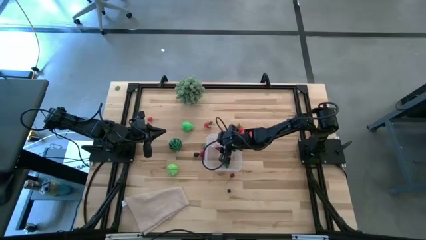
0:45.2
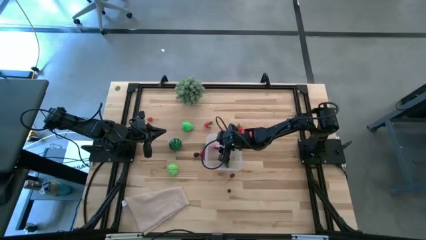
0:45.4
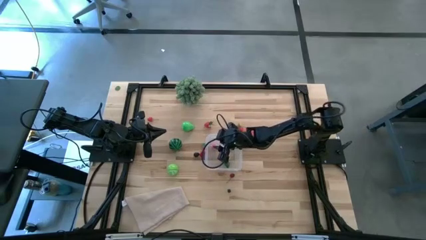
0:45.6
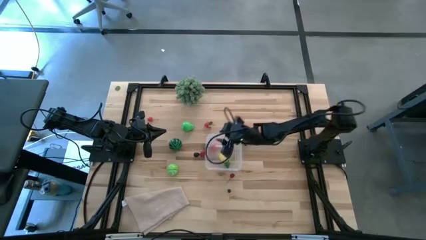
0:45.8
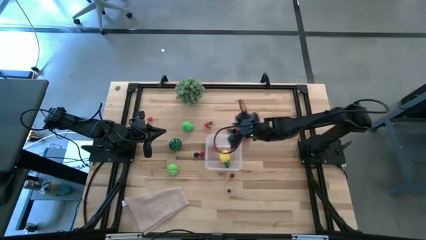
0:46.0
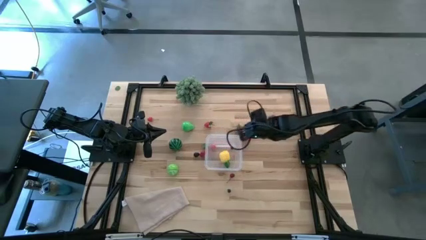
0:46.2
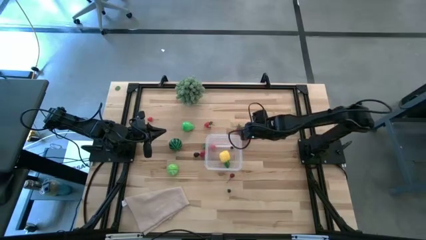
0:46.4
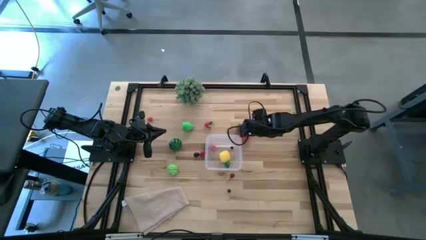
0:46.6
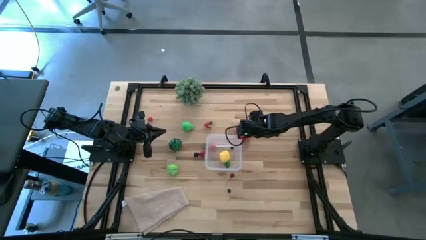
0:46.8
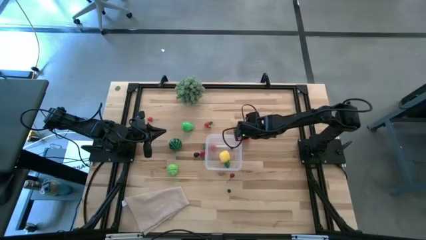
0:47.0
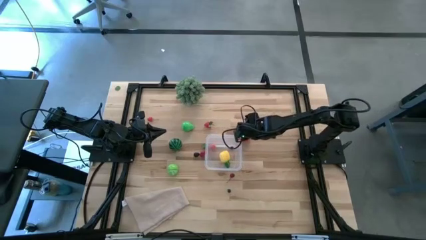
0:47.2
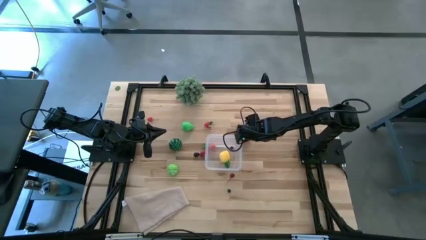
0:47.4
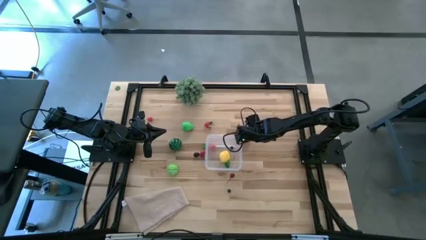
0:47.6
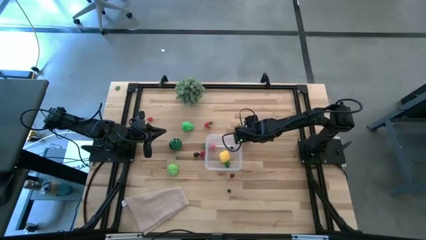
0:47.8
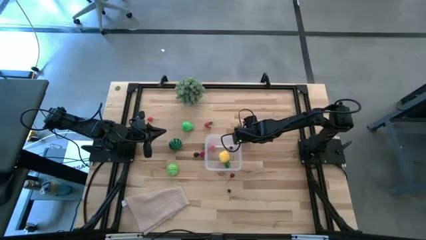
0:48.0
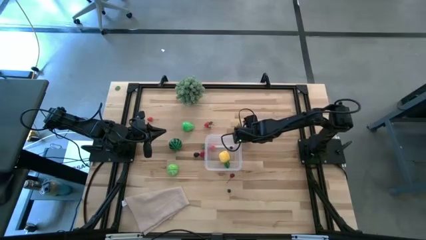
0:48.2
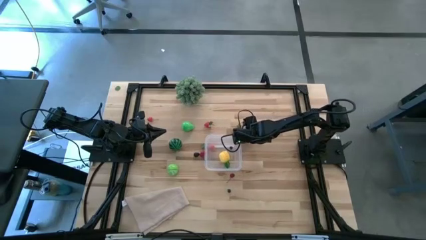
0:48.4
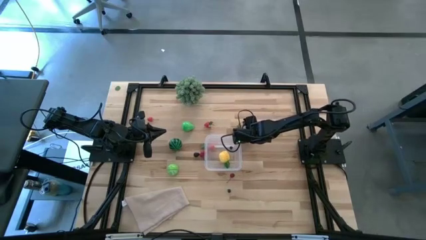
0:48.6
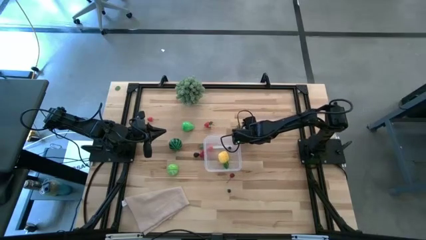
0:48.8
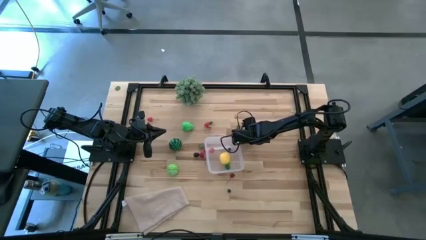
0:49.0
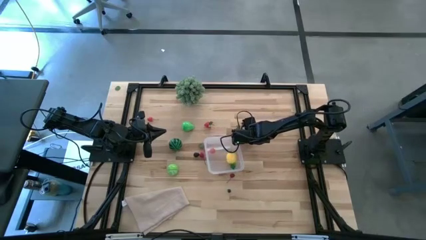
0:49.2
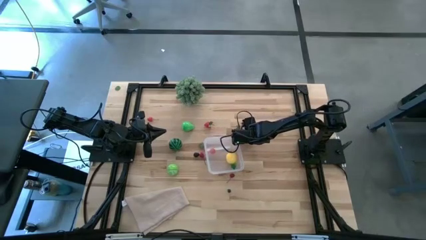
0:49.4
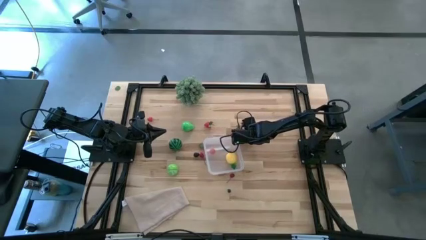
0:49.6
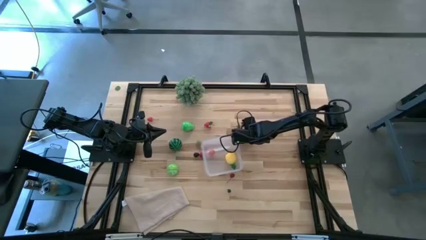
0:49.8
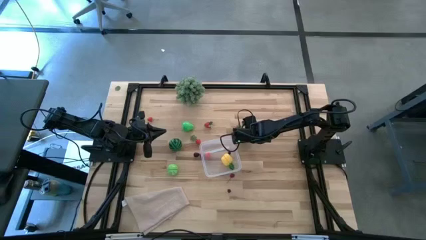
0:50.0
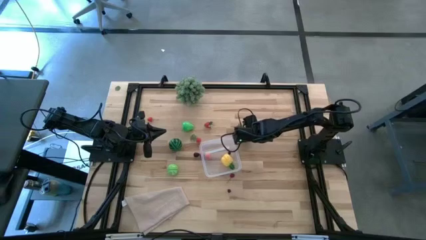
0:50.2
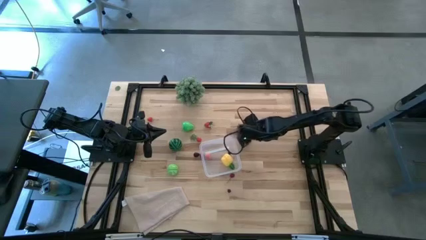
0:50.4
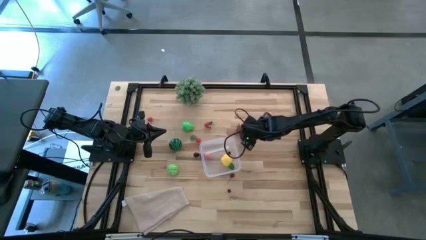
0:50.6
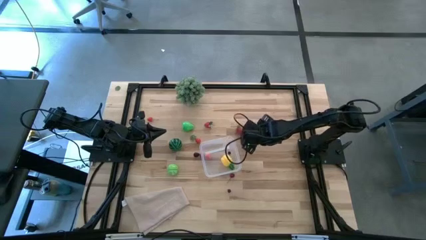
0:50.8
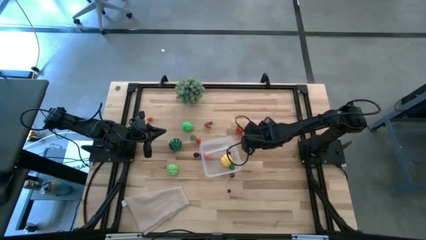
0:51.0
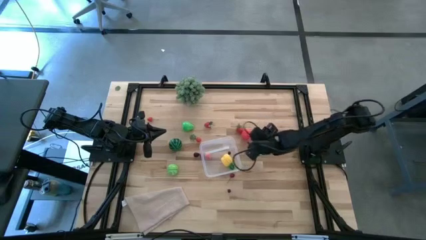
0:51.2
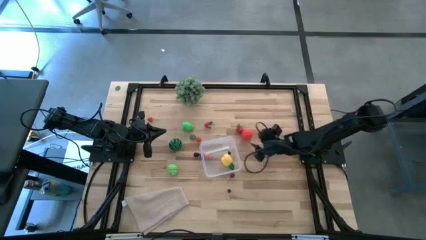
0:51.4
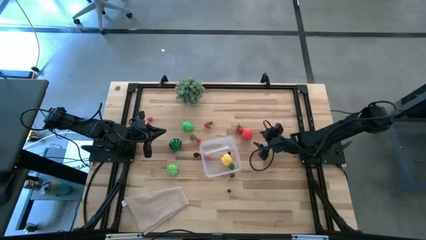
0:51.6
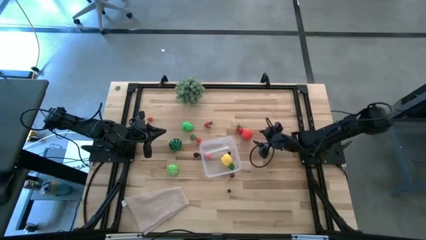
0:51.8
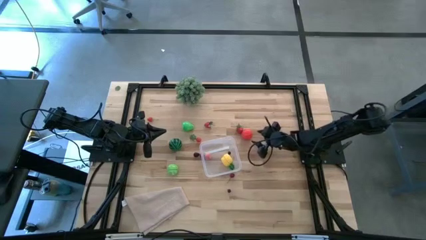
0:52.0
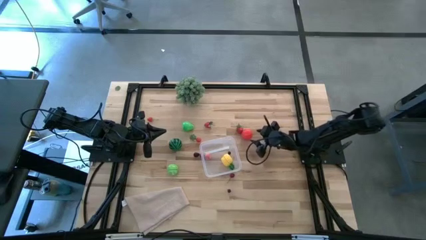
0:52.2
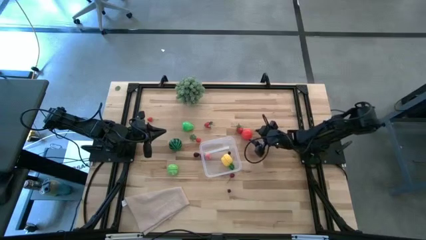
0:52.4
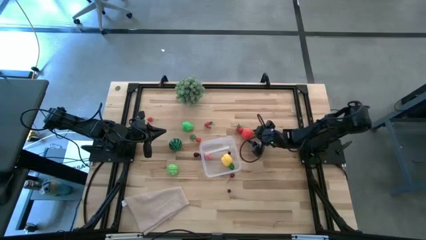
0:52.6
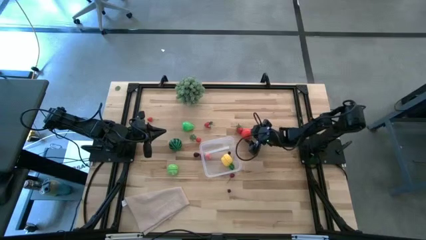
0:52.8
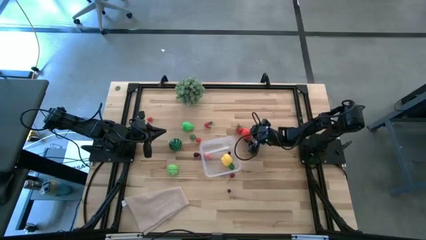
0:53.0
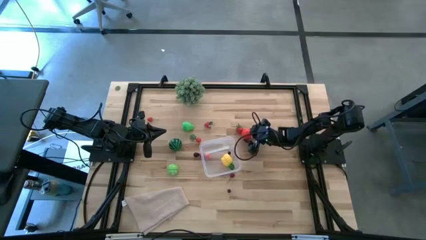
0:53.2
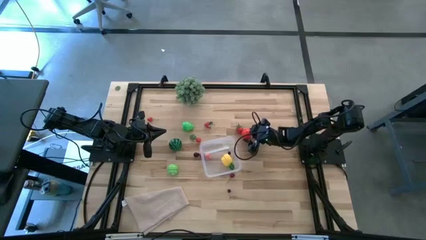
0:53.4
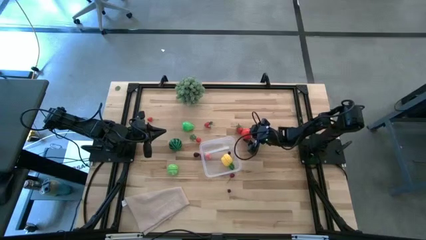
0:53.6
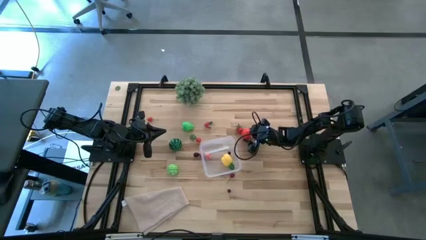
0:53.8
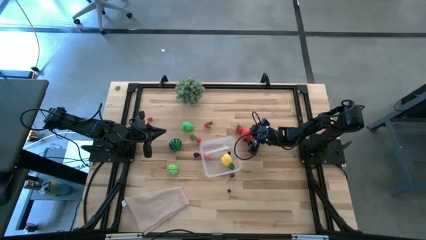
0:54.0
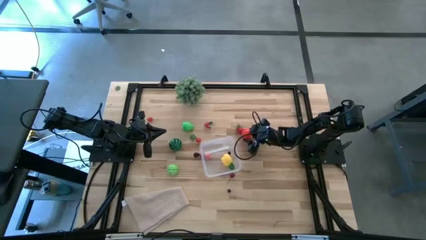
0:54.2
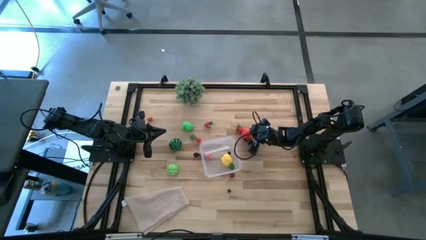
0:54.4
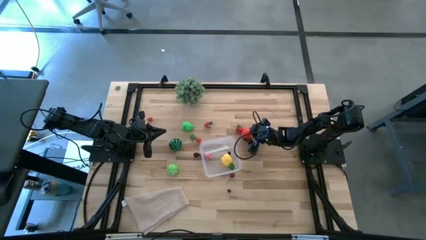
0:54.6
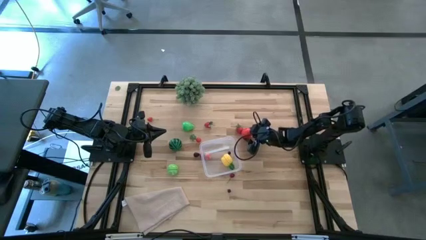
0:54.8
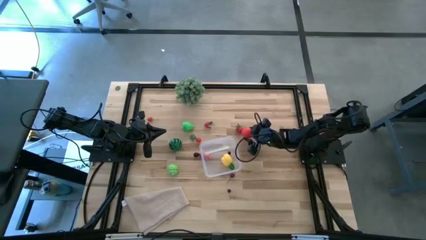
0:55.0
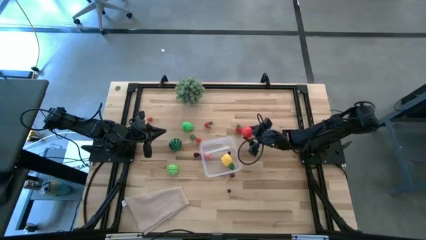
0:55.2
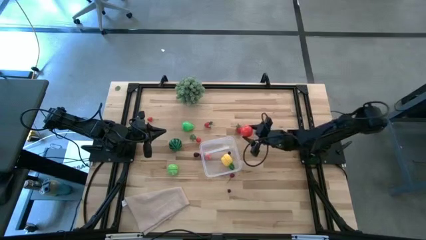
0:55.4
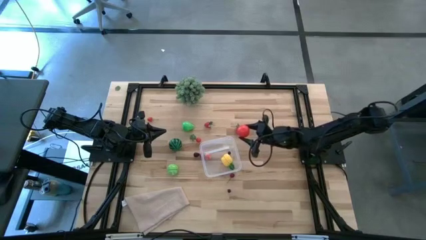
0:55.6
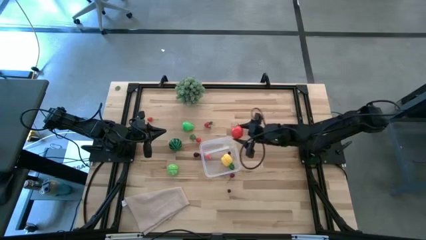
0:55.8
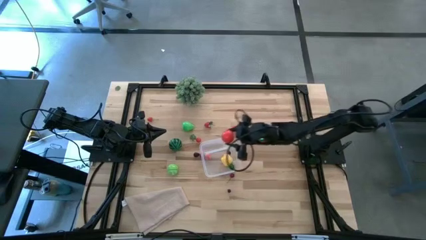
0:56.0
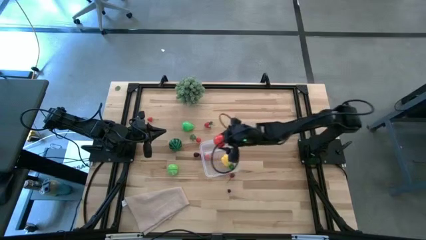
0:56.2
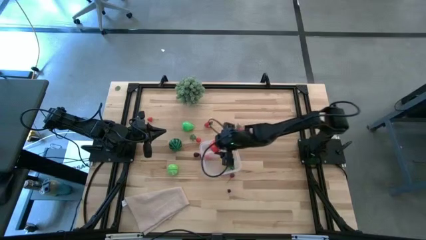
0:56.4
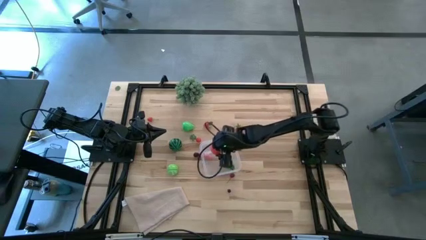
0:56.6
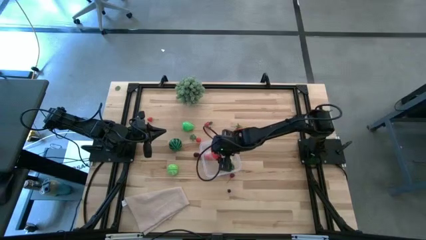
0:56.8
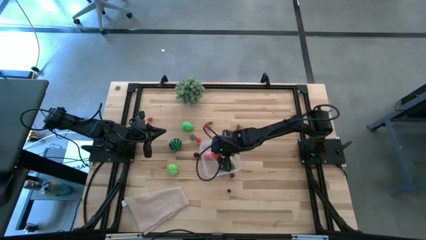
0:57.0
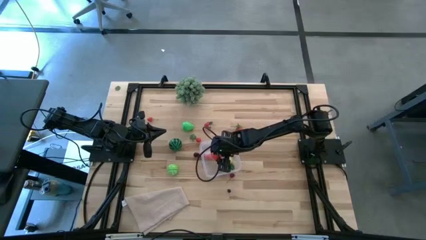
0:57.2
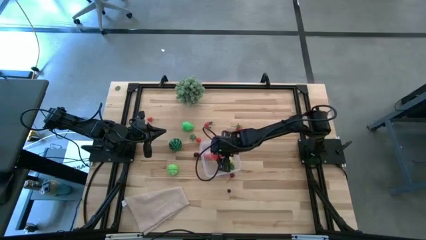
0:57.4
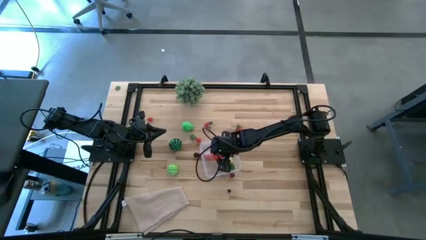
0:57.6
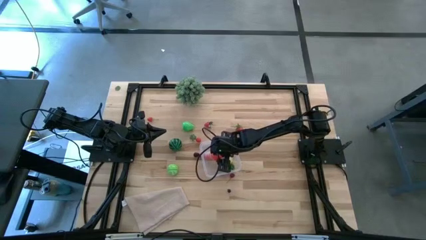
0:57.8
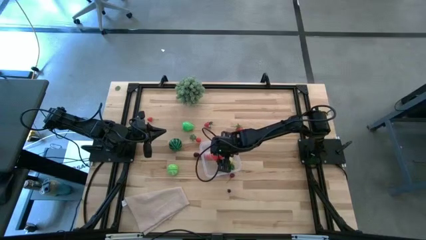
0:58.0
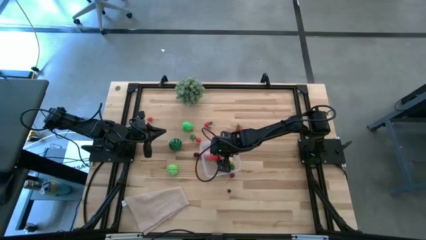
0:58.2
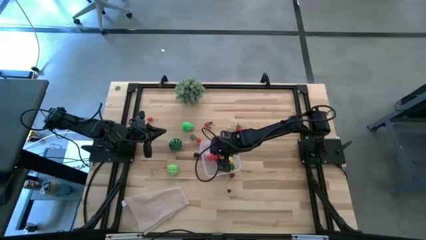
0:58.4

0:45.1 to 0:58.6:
Task: Pick and placing Produce into tupperware
Put the red tomato into the transparent bin

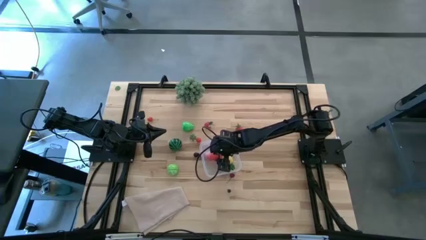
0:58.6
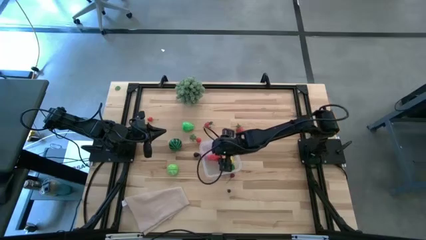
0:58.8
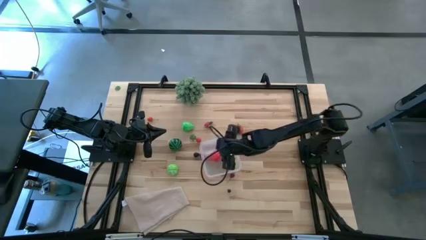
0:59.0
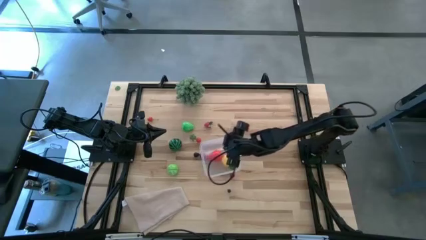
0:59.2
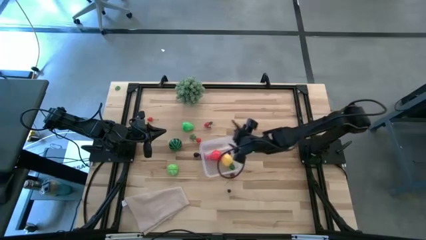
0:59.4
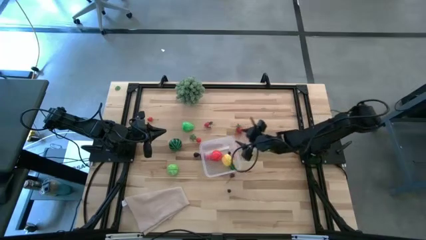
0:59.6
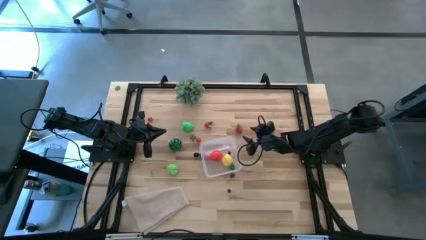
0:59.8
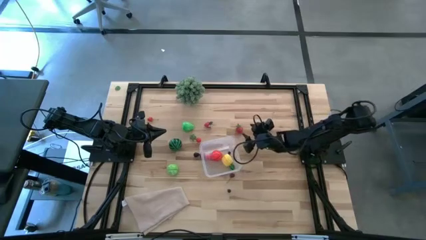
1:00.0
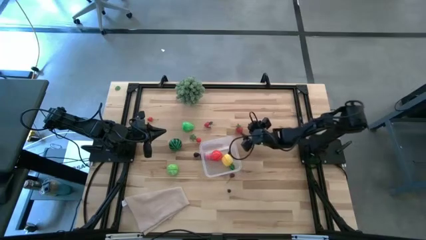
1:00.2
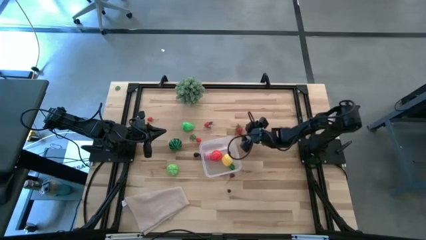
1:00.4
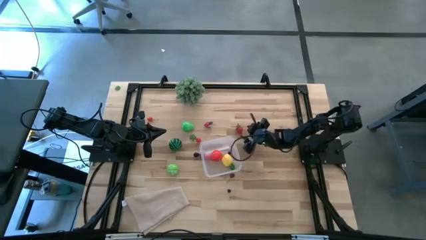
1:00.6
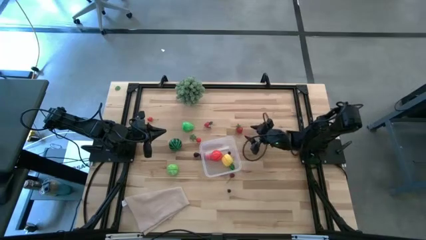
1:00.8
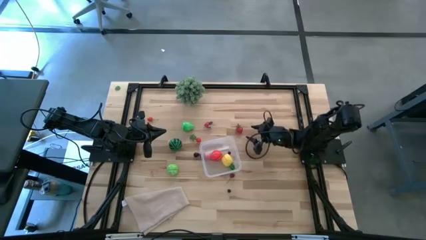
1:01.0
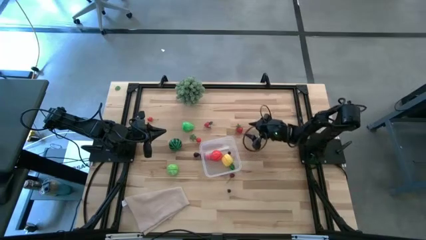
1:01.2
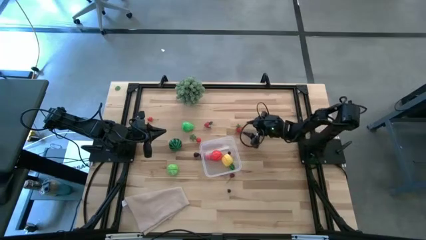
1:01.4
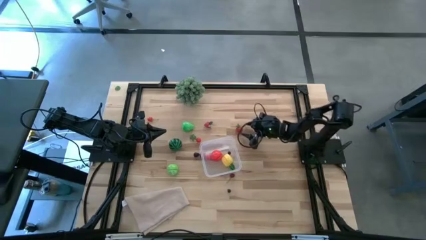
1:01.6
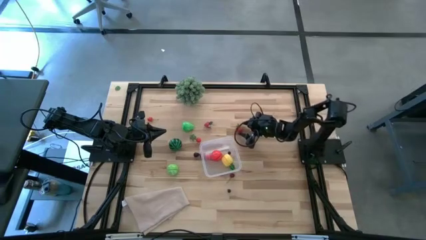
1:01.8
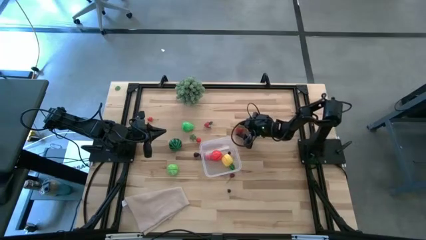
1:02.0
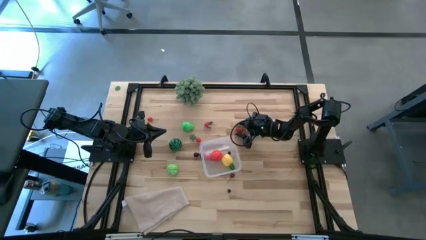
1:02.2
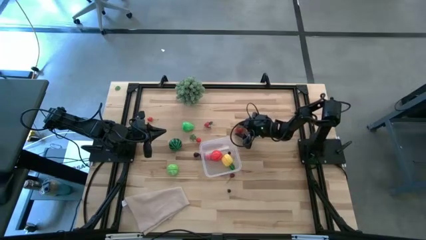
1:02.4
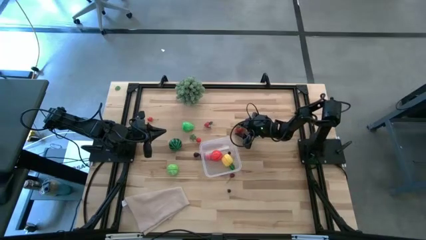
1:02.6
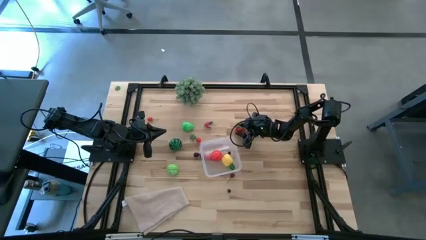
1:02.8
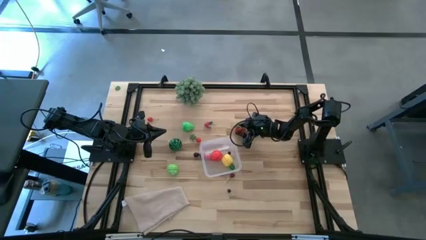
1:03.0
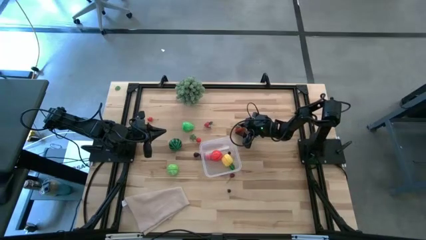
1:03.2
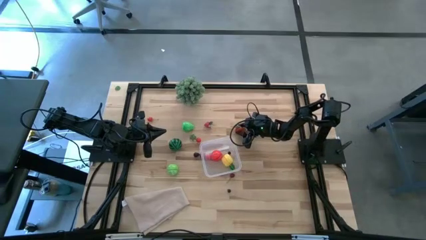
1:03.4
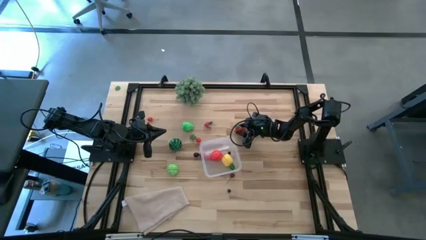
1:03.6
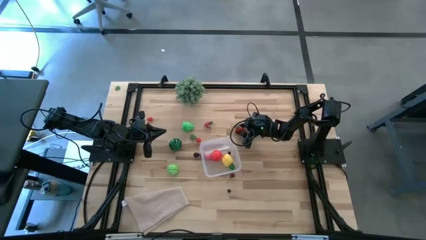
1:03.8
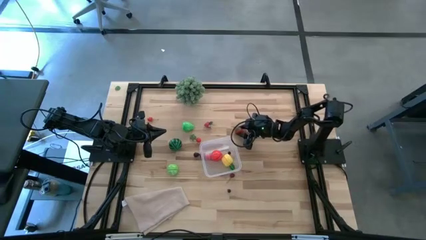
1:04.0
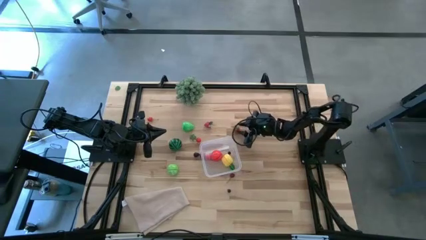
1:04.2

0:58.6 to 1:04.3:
Put the right red strawberry into the transparent bin
